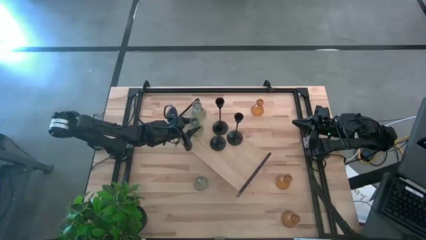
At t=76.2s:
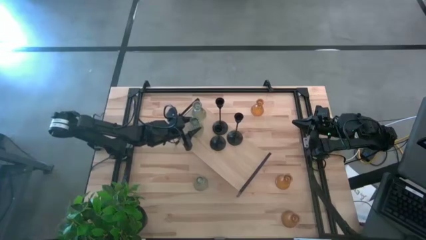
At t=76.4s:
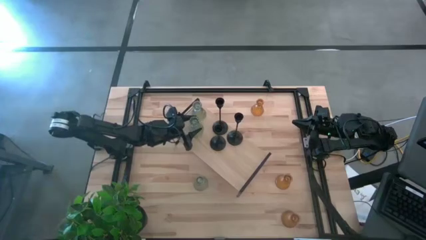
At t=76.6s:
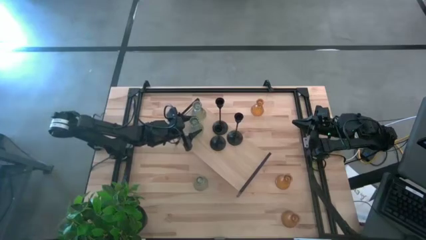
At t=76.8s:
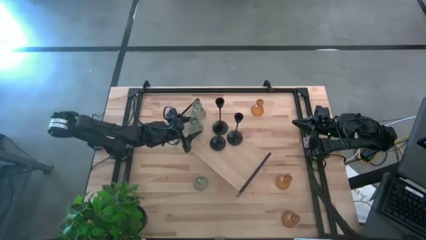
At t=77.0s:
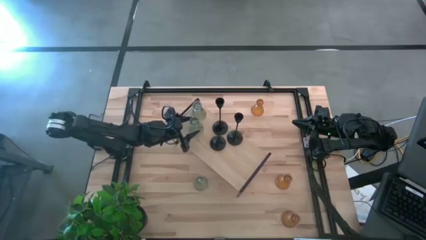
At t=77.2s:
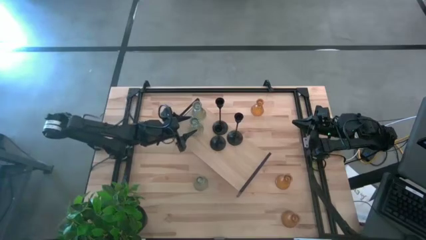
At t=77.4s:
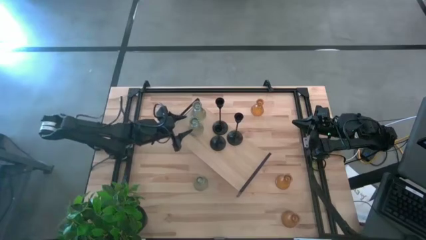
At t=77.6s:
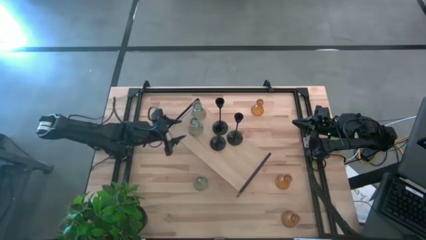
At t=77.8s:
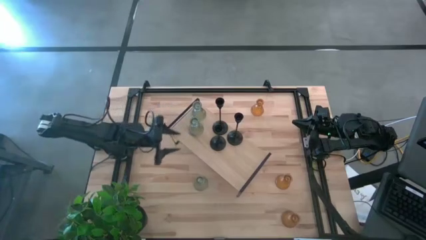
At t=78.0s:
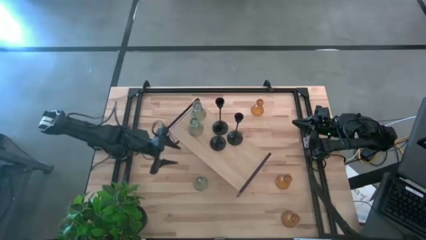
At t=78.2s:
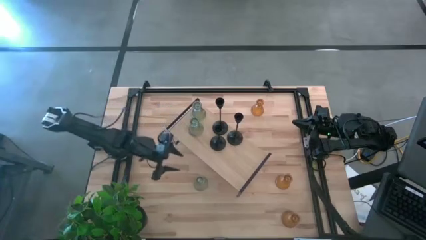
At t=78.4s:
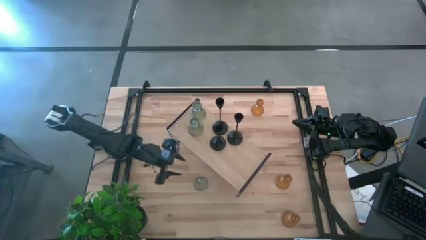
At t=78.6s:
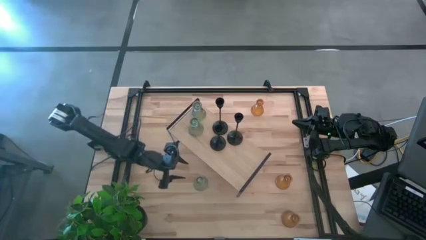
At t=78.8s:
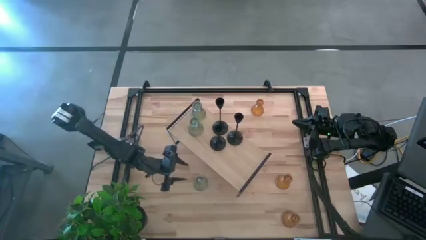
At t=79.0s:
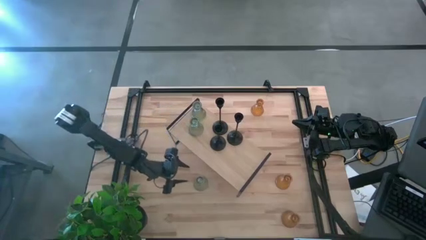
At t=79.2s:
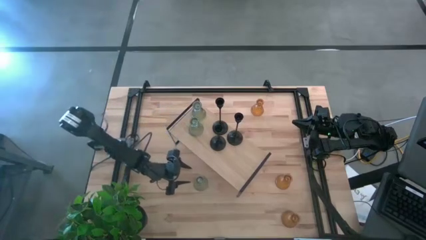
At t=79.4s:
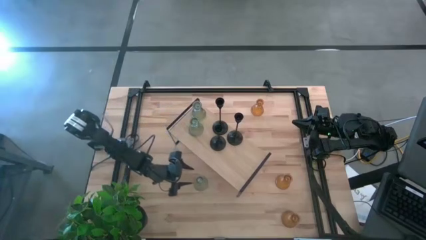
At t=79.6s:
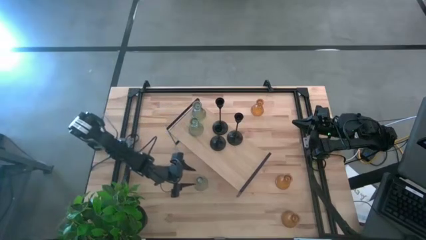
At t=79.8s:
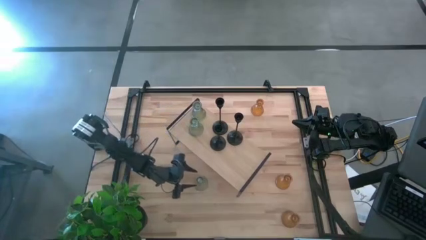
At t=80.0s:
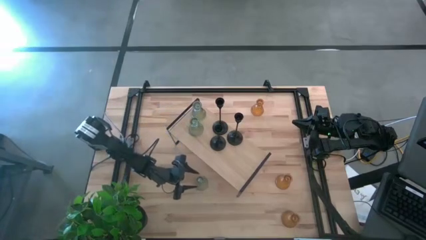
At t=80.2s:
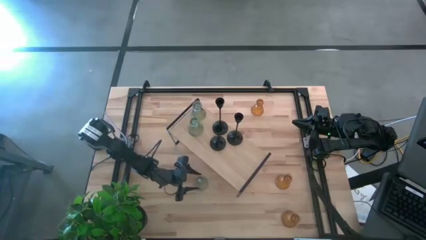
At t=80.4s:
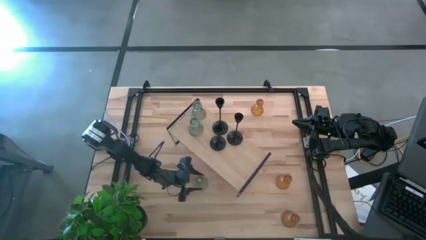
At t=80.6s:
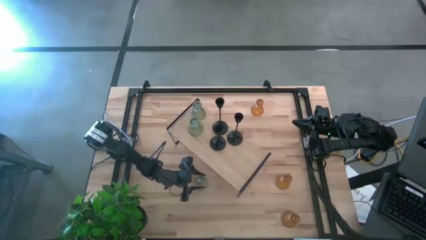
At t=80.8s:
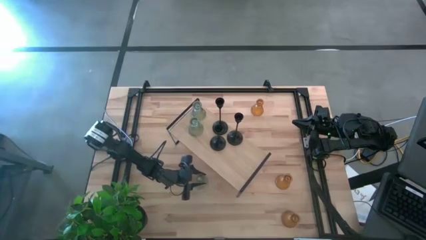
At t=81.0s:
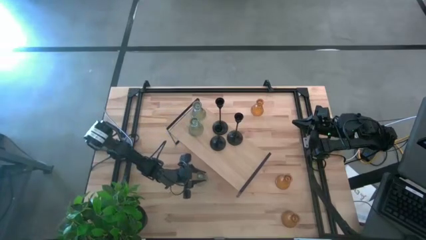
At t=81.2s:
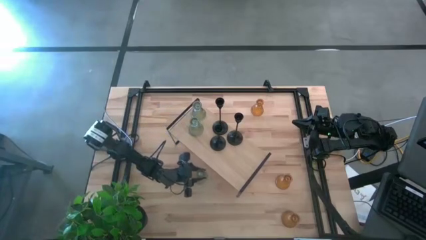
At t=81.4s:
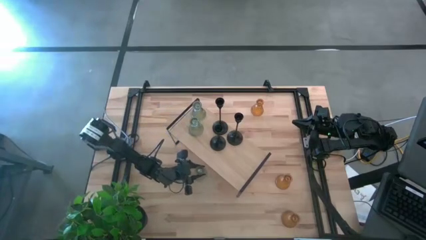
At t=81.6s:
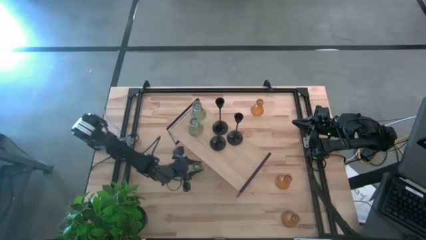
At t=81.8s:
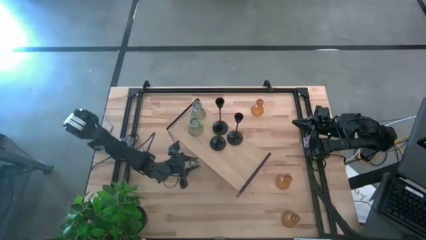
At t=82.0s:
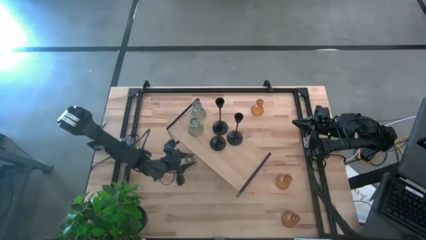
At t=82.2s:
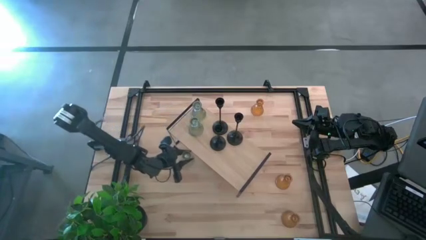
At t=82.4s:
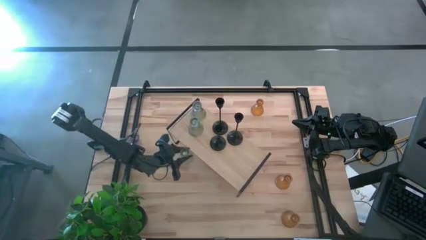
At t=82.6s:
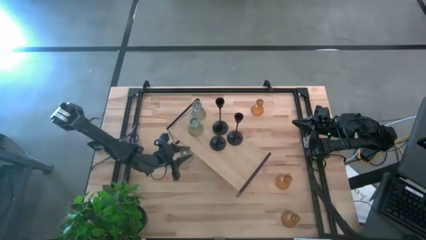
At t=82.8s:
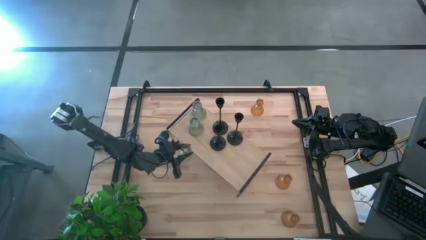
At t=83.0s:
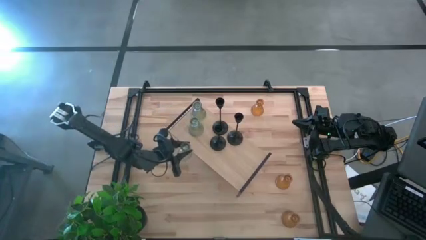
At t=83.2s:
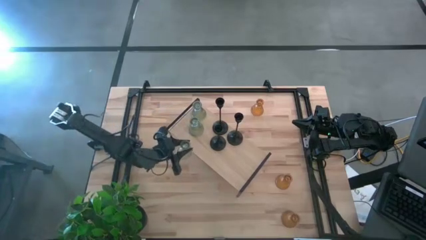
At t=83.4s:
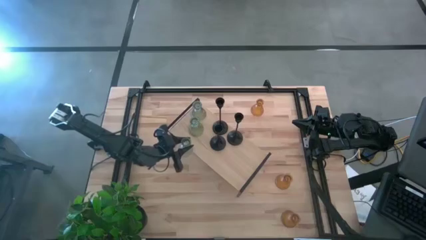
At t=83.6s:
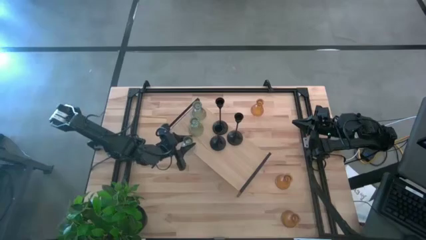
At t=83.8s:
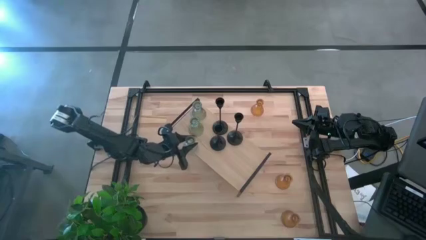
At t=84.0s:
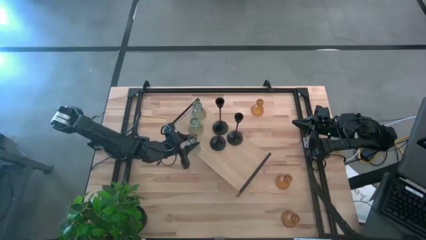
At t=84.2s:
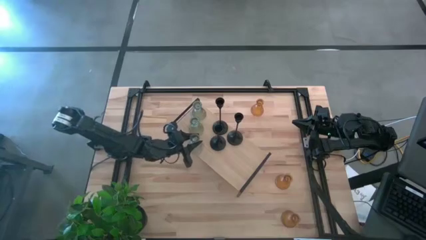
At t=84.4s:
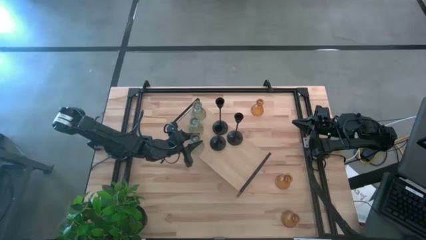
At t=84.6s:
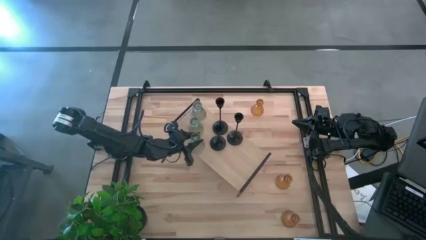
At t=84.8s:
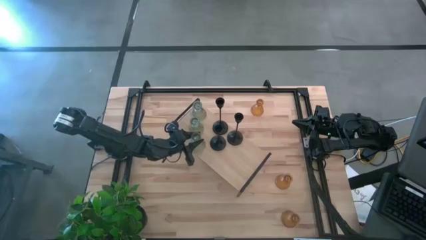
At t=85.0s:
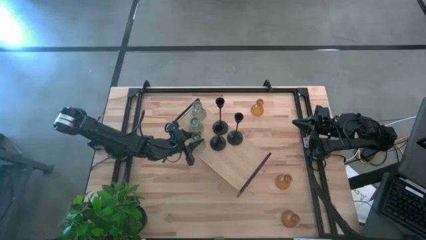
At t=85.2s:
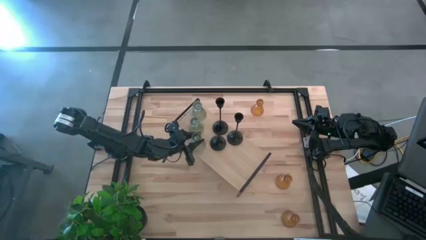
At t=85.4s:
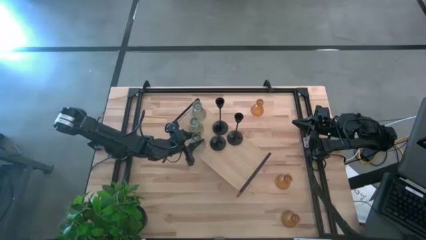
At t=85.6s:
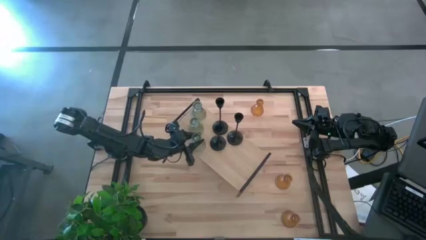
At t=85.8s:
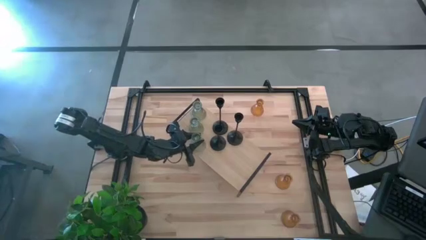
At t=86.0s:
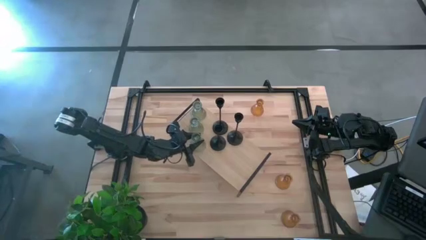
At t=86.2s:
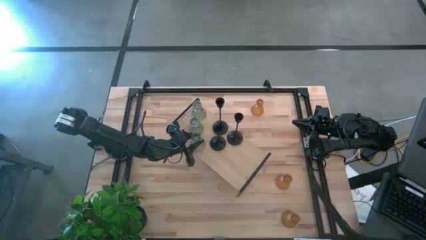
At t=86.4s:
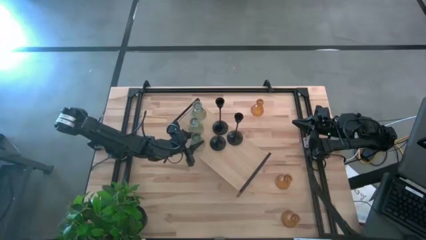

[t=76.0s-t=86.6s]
Task: Pick & Place candle stick holders
Put the transparent candle holder on the shelf

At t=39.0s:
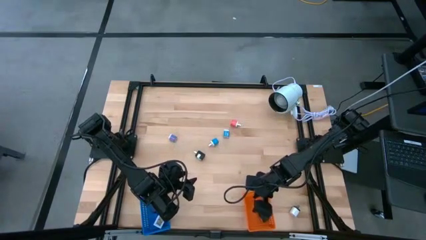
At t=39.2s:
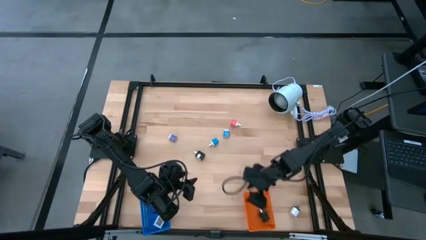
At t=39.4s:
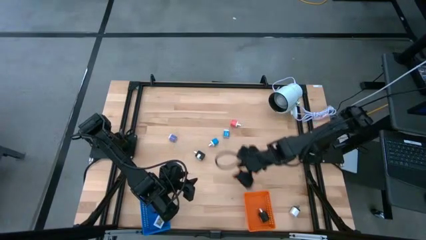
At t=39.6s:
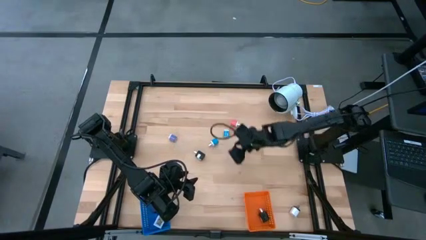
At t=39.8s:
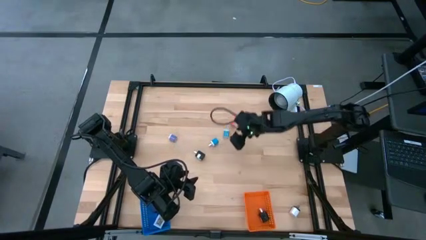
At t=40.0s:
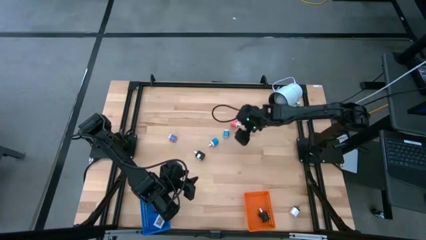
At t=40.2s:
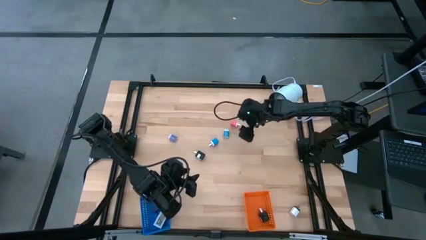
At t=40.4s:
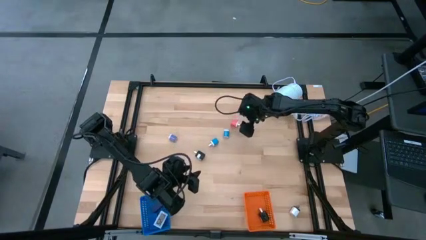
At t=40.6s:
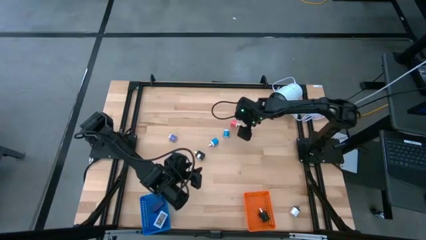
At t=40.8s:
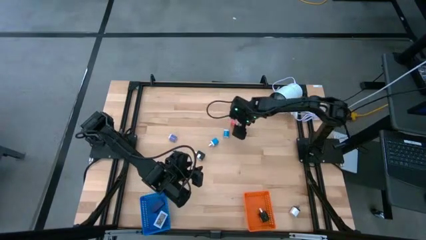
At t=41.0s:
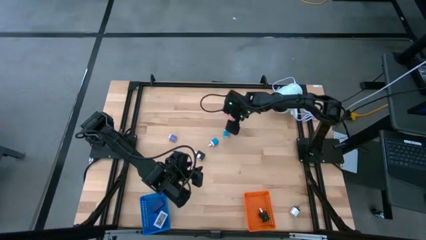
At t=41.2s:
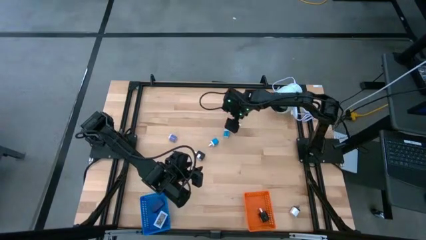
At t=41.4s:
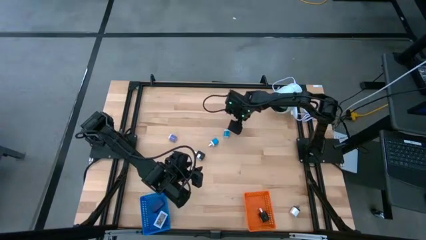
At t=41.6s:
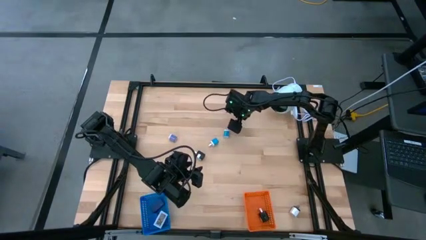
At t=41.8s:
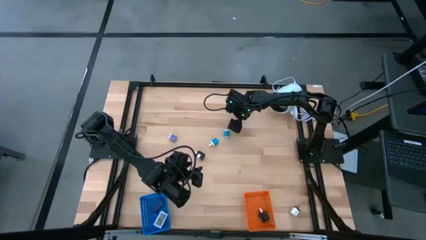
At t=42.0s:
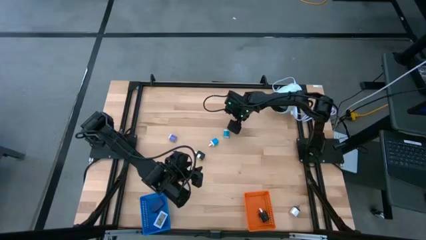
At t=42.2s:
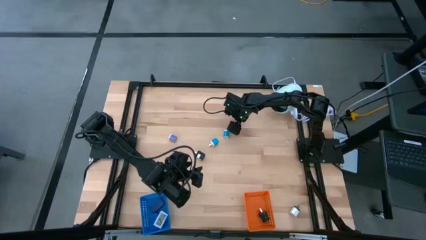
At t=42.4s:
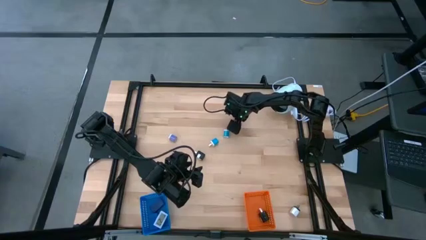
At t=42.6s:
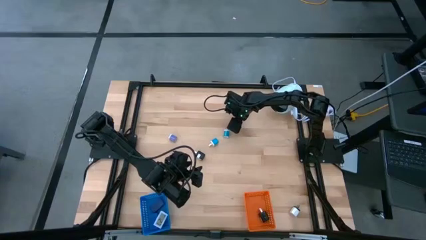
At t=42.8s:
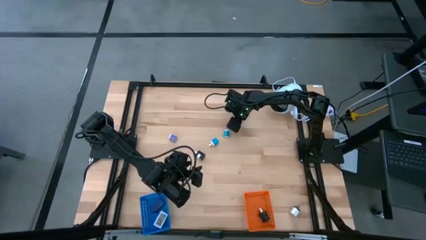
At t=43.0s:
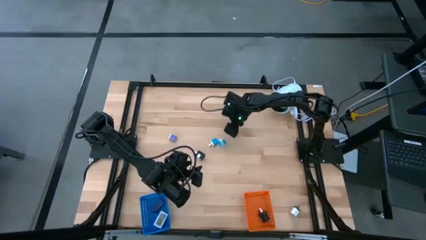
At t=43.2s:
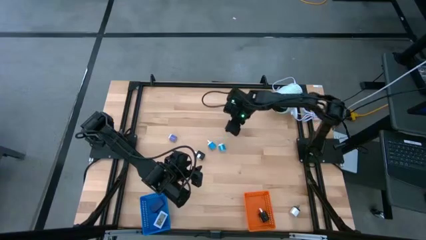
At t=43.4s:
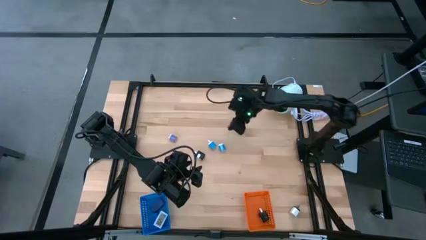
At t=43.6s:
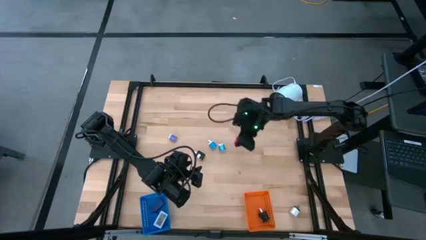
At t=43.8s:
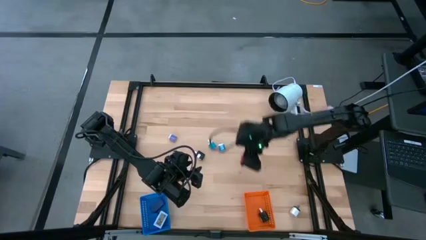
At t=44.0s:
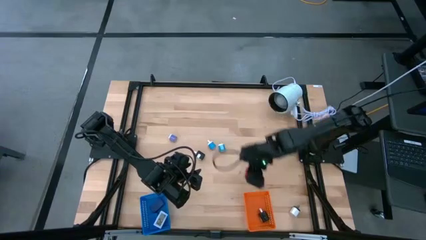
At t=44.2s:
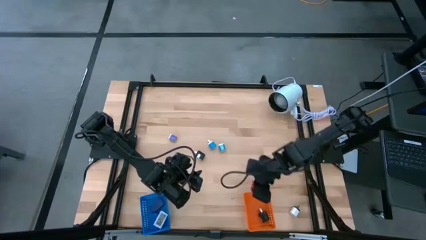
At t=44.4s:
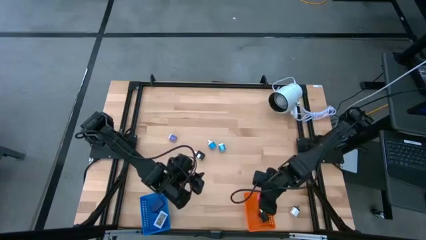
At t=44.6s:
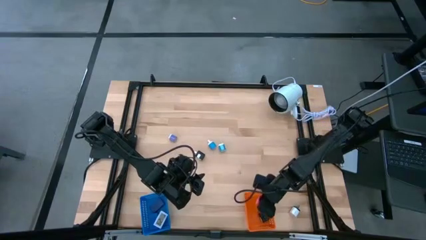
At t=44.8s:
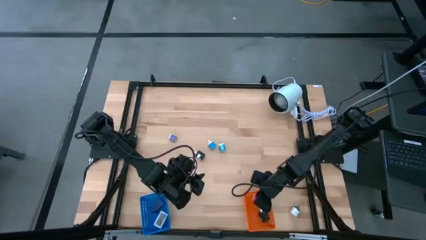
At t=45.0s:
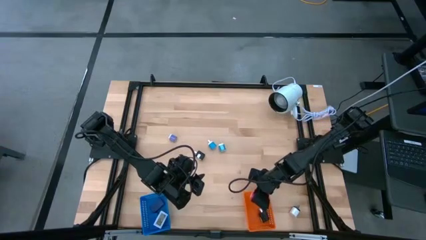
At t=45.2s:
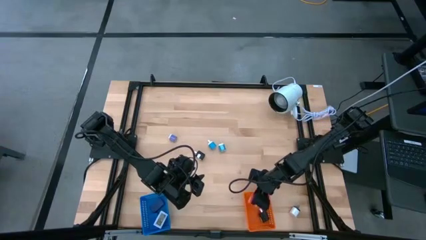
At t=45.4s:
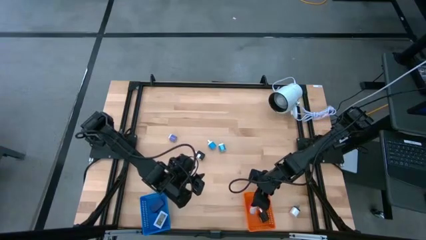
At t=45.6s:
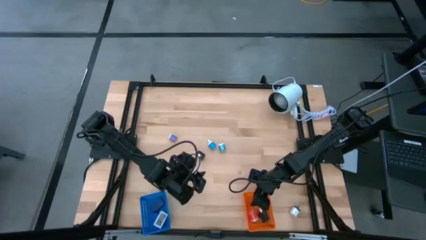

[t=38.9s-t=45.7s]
Task: Pick & Place Office items
Put the pink charger adapter into the orange bin
